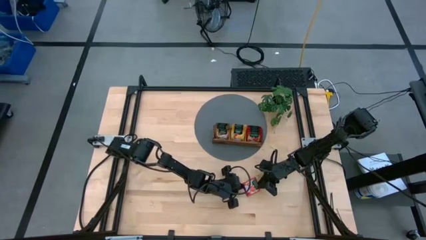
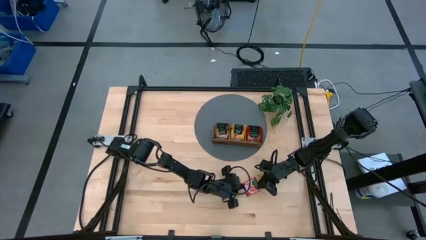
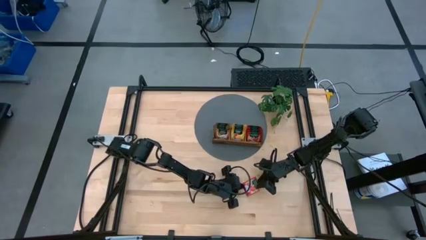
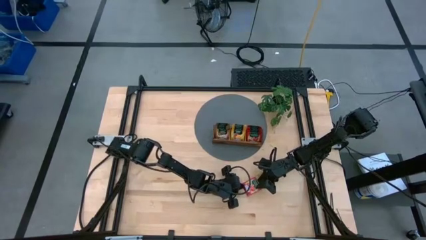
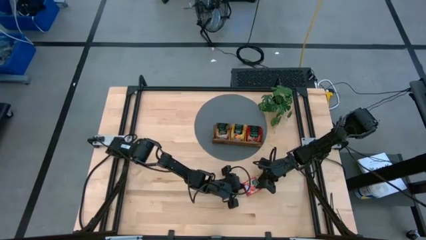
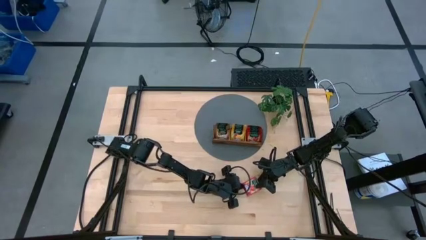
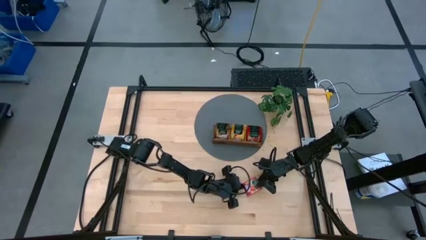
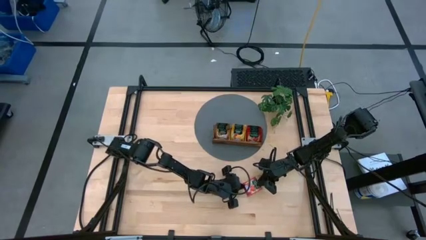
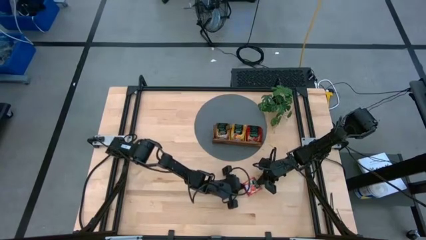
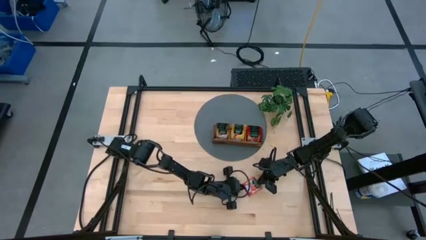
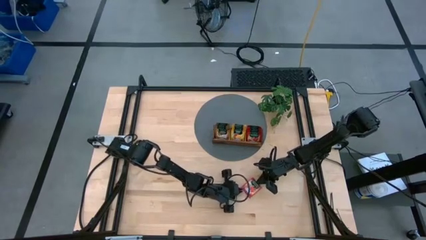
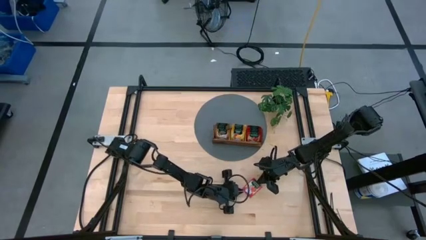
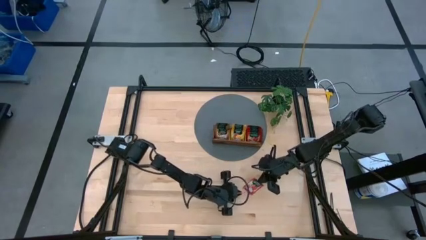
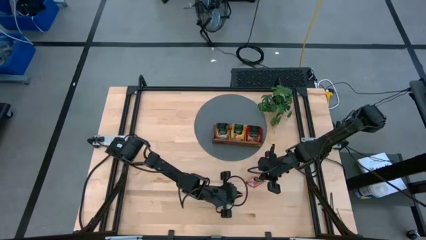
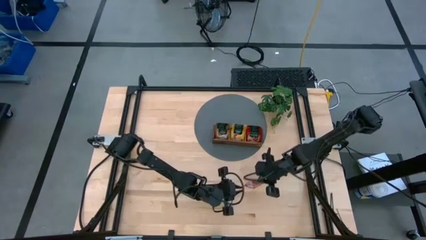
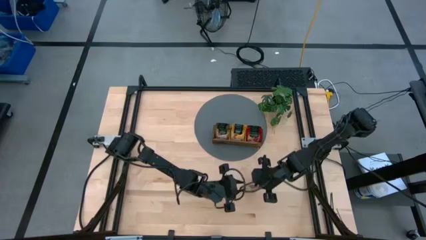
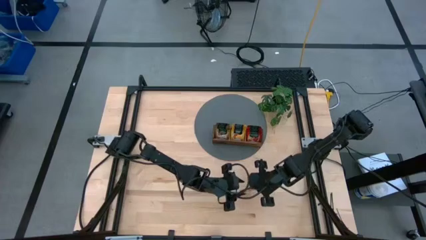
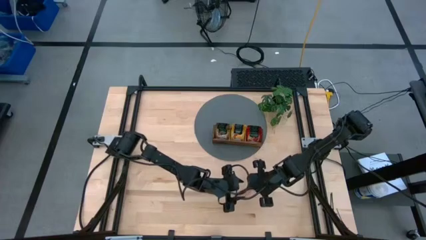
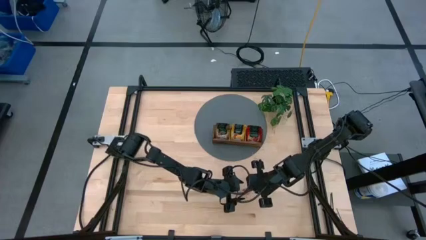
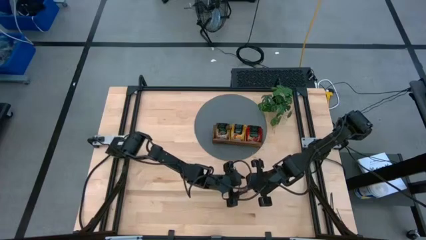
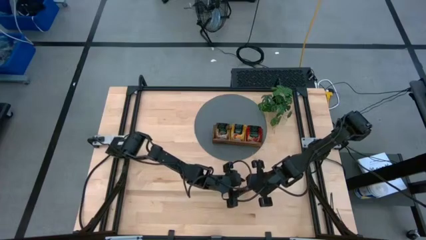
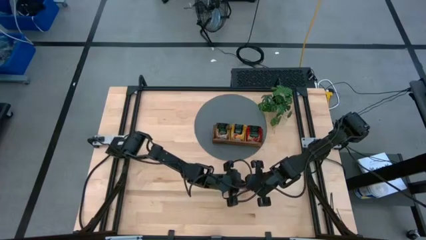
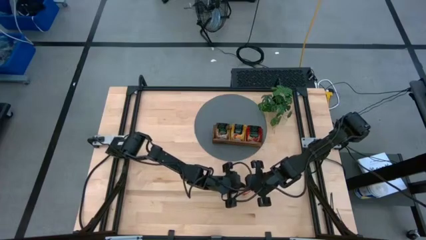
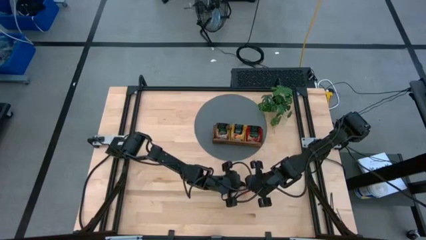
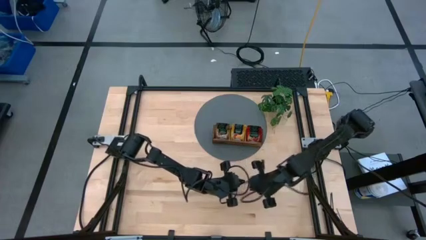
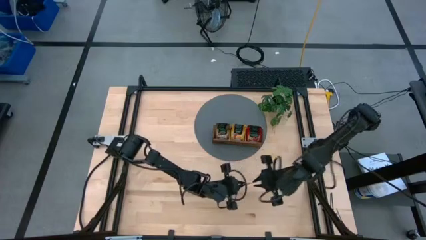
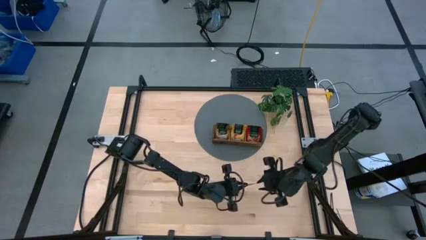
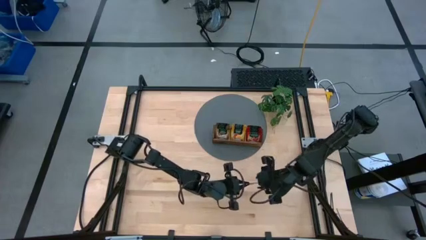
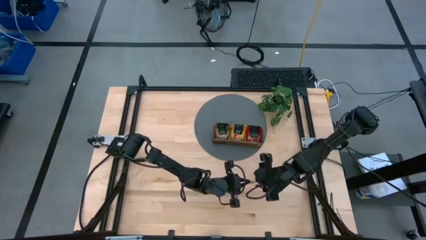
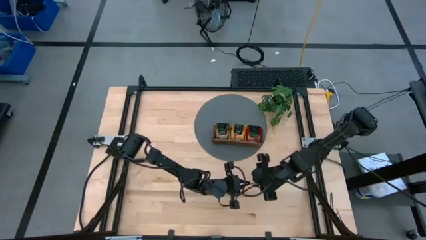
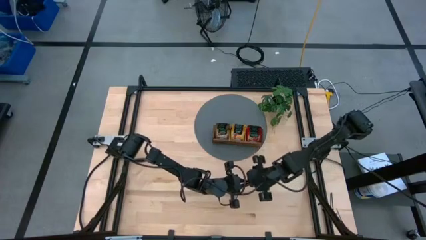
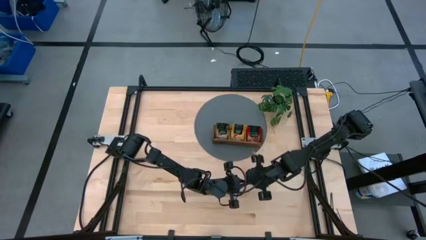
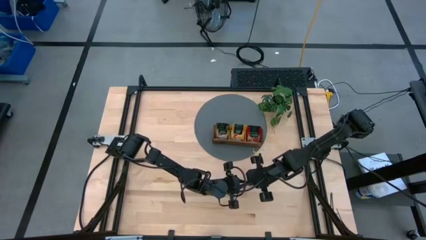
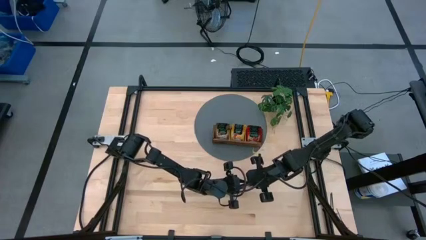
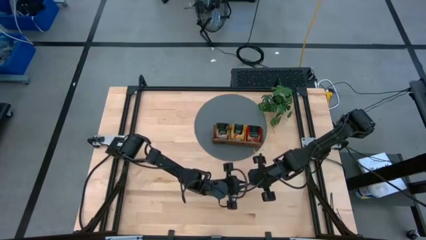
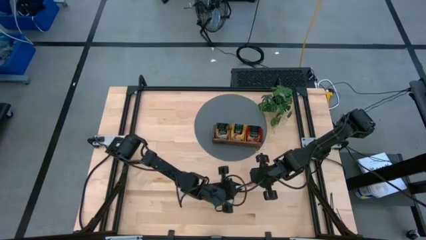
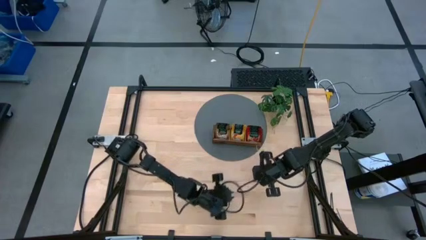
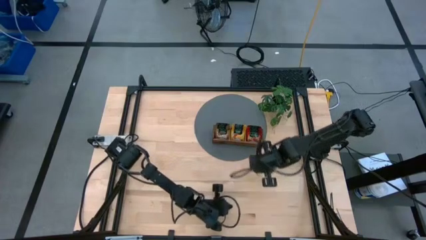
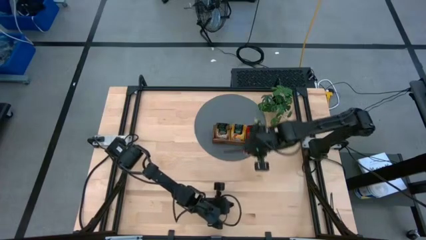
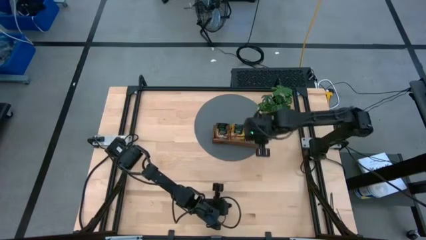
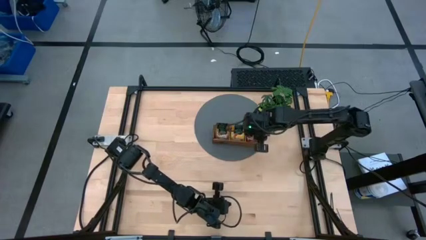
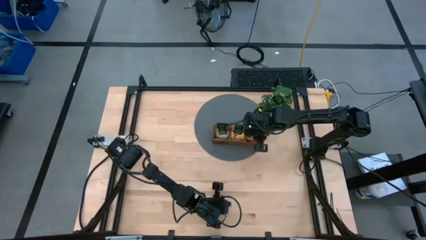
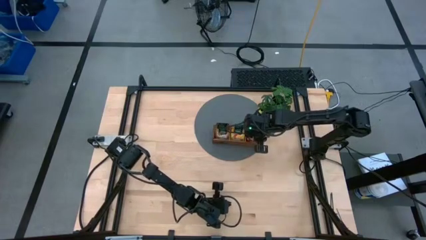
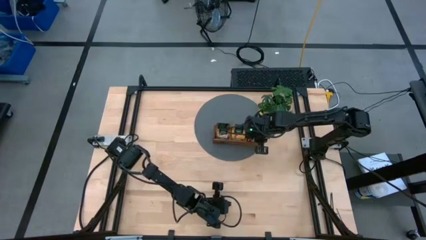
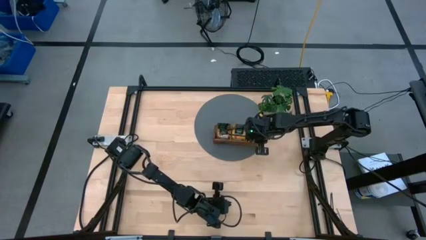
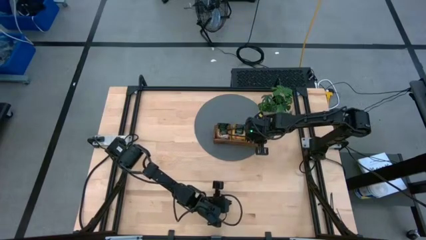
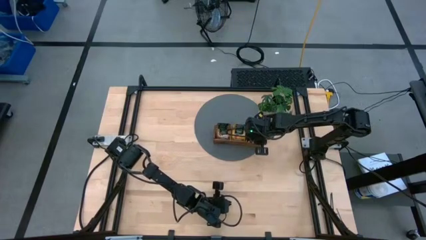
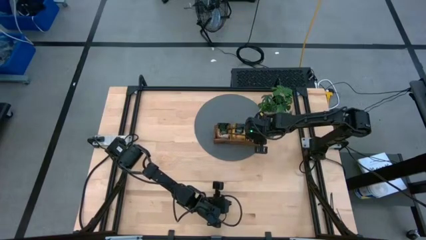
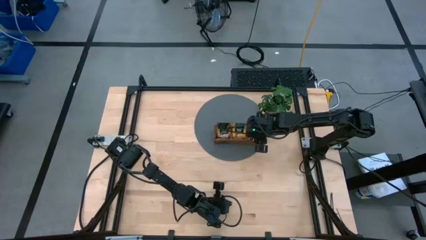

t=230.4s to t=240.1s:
Task: Pick & Place Tea
Put the red tea bag into the right section of the wooden organizer

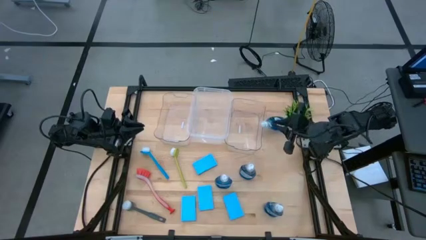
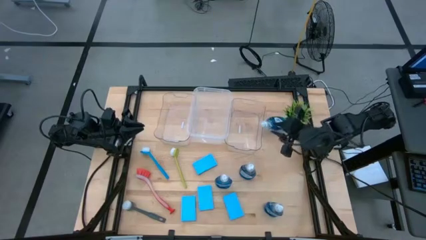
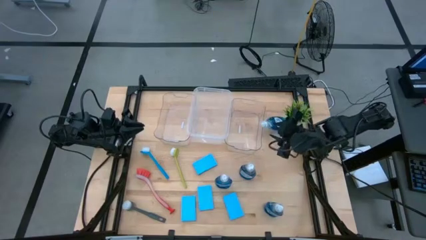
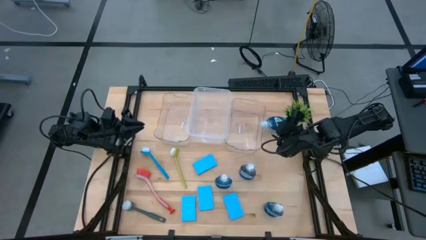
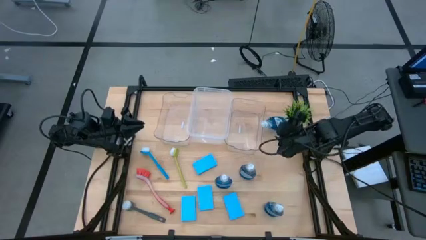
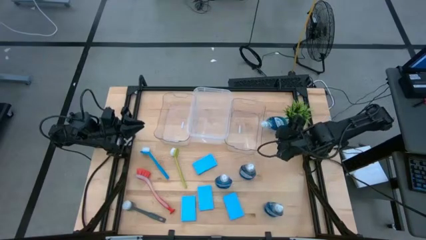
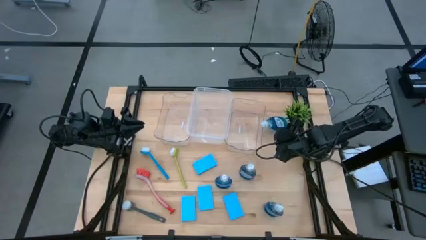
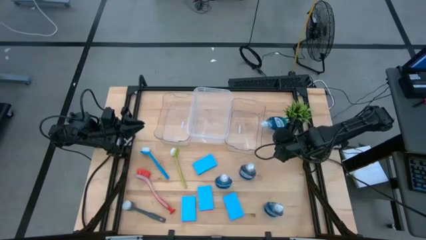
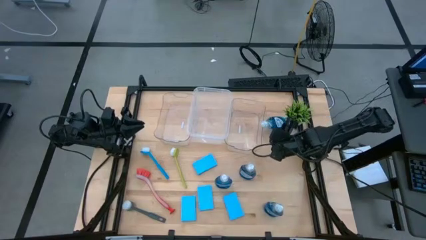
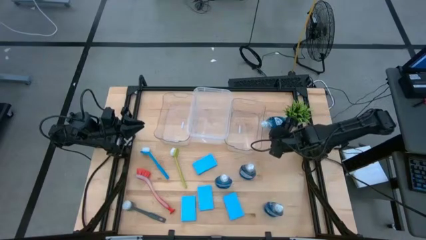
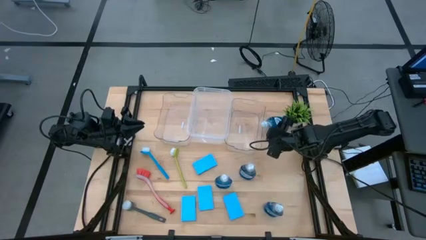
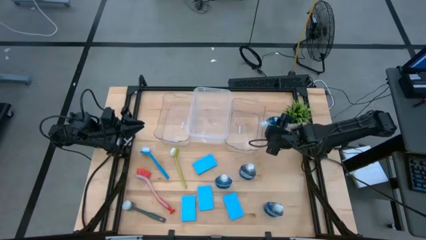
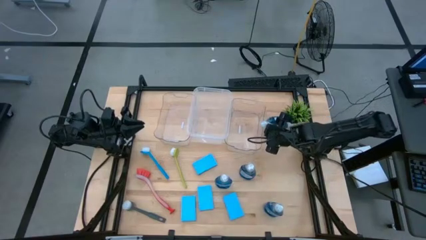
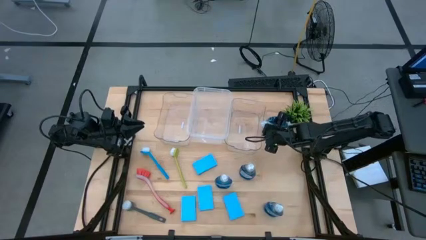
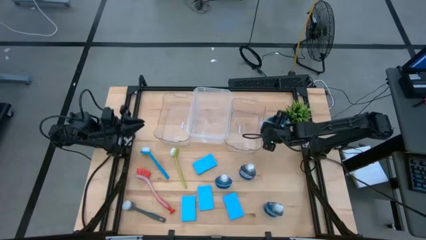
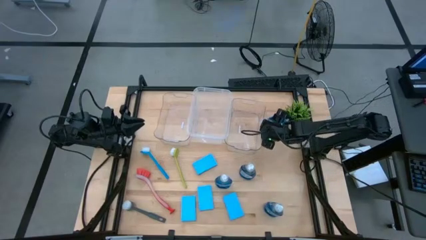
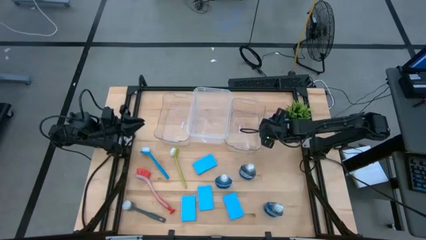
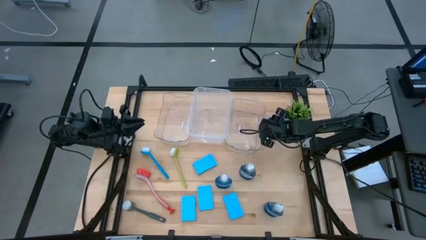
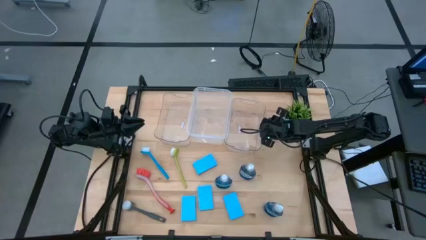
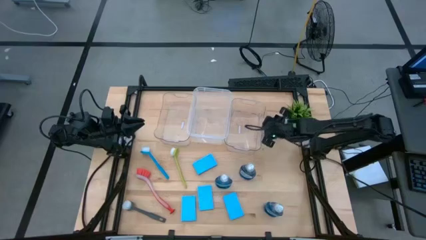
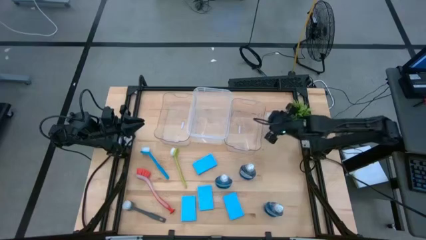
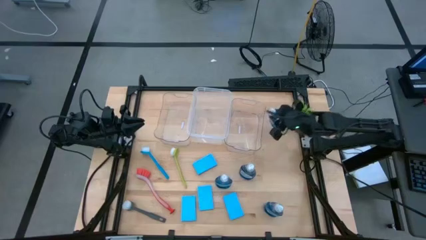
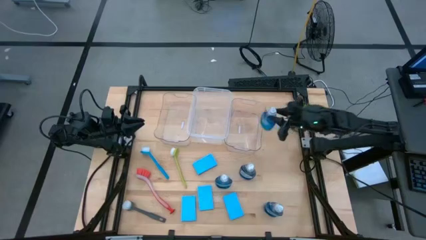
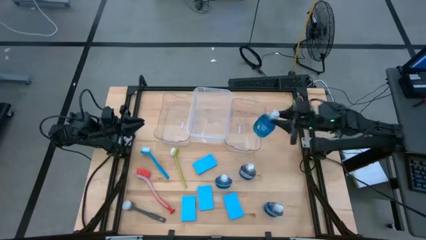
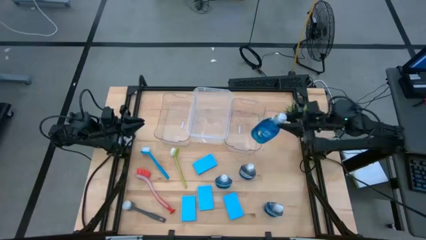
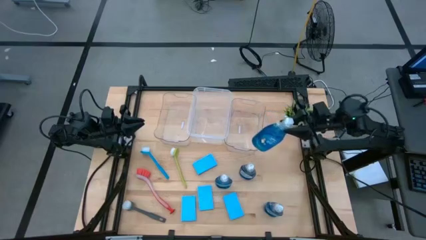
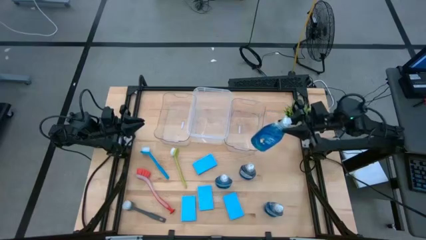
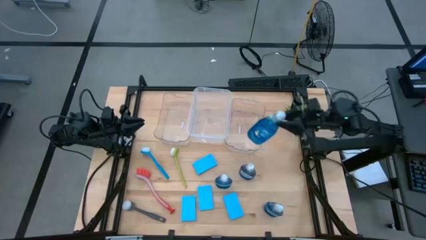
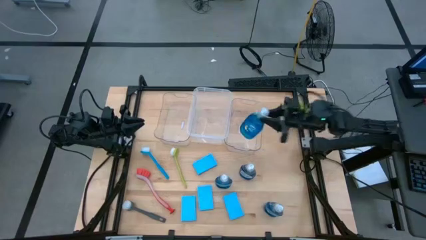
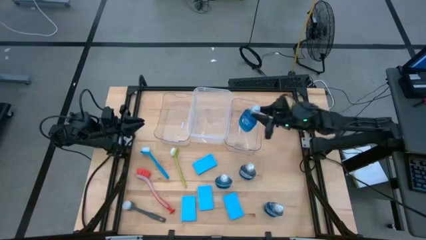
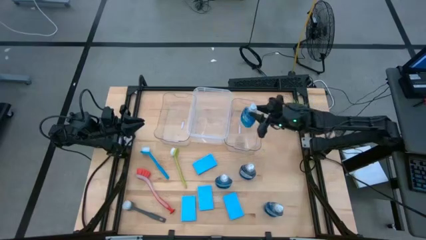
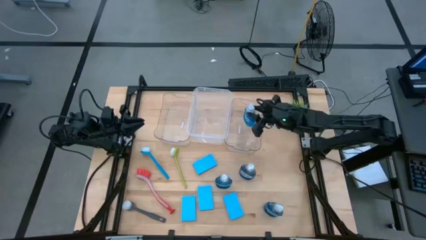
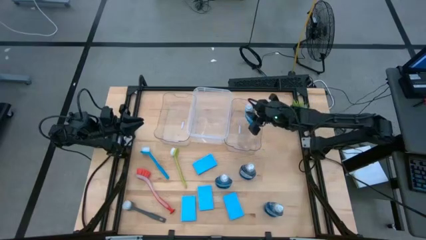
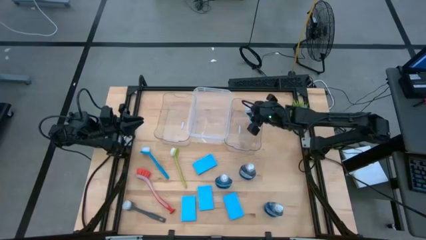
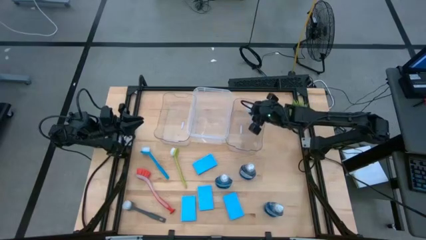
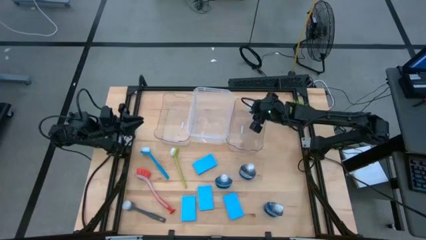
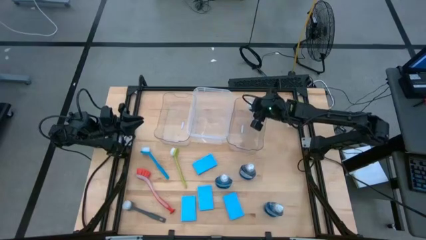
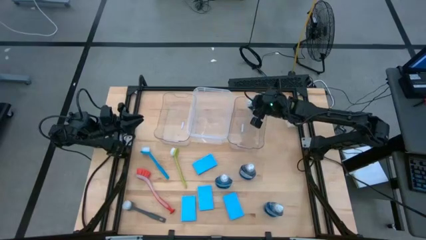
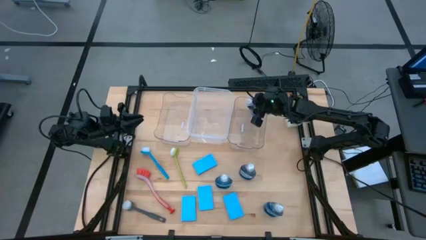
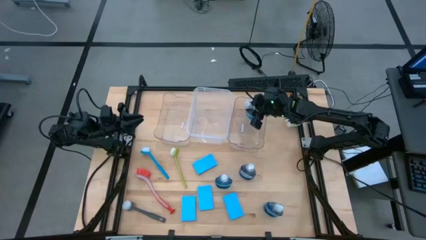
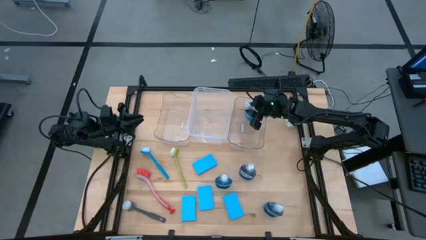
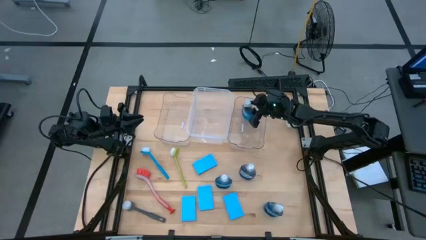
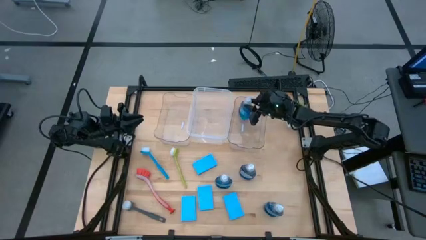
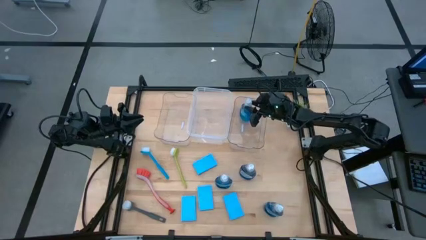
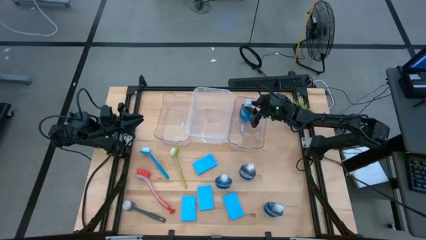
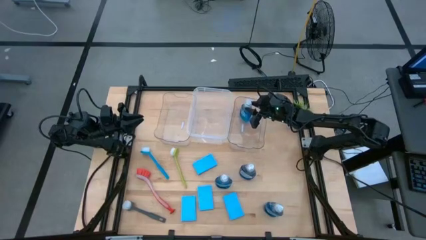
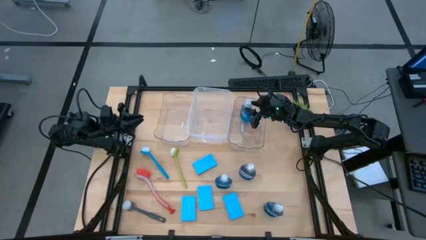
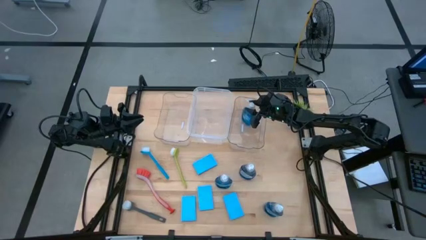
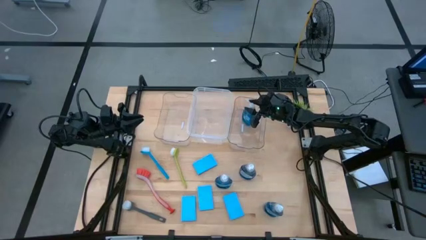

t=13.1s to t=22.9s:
Task: Pick & Place Kitchen Sink Supplies
Put the blue dish soap into the right transparent bin
